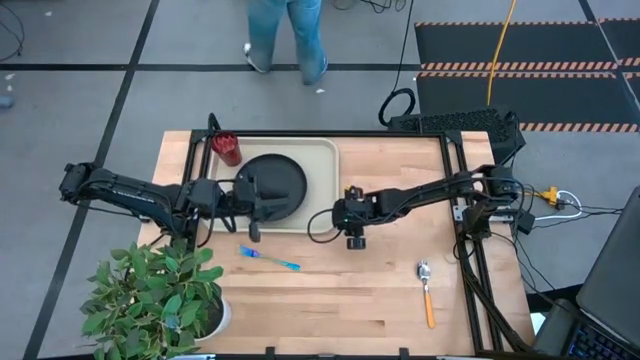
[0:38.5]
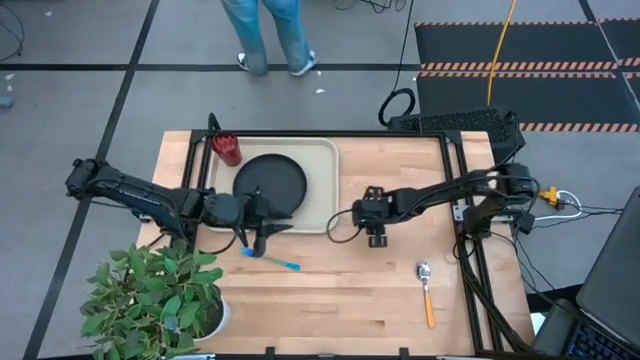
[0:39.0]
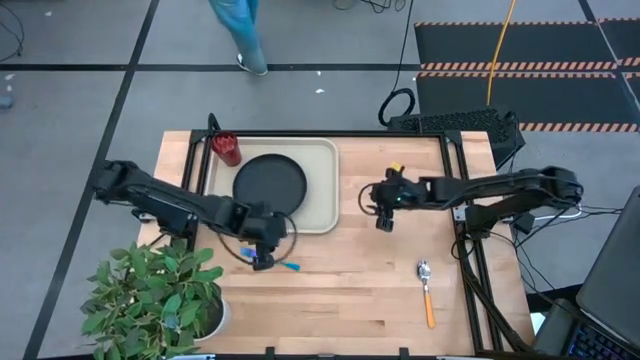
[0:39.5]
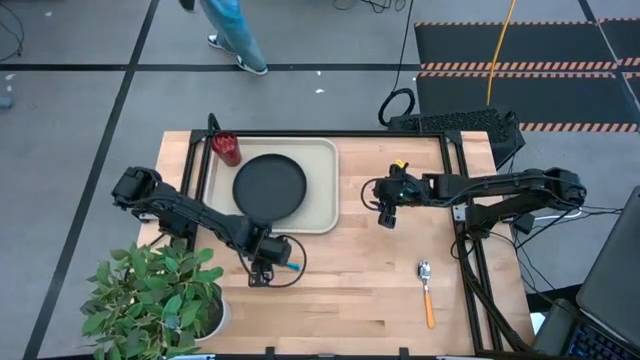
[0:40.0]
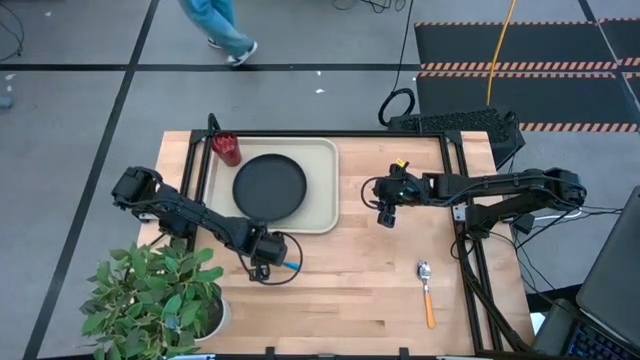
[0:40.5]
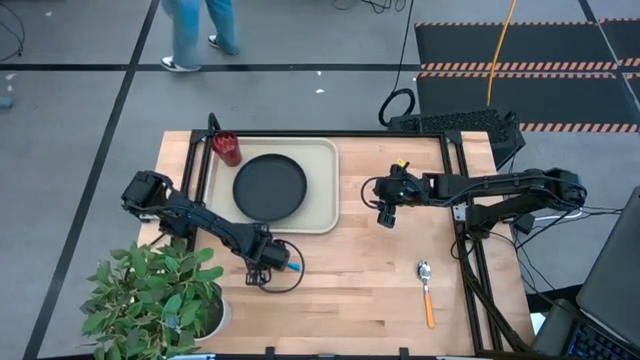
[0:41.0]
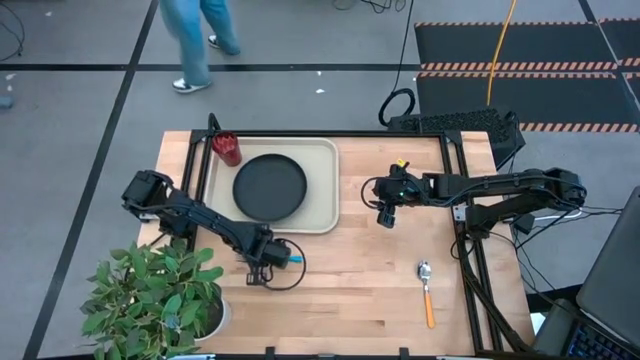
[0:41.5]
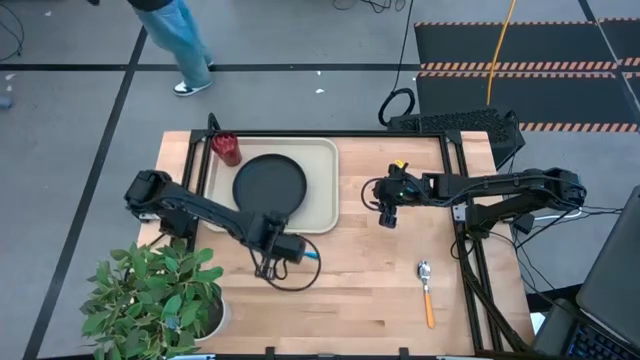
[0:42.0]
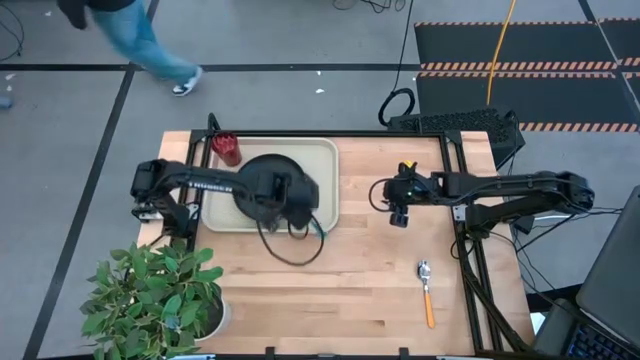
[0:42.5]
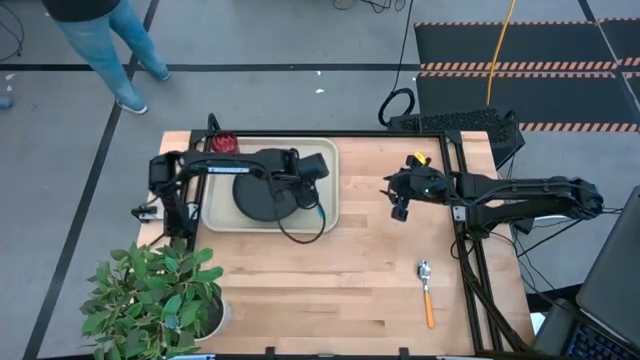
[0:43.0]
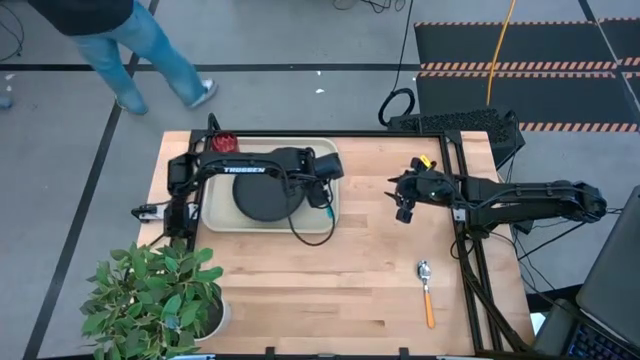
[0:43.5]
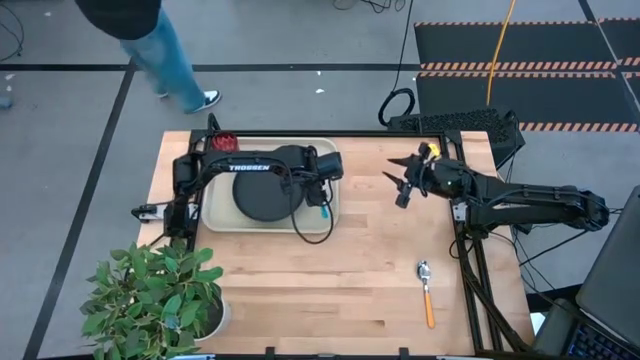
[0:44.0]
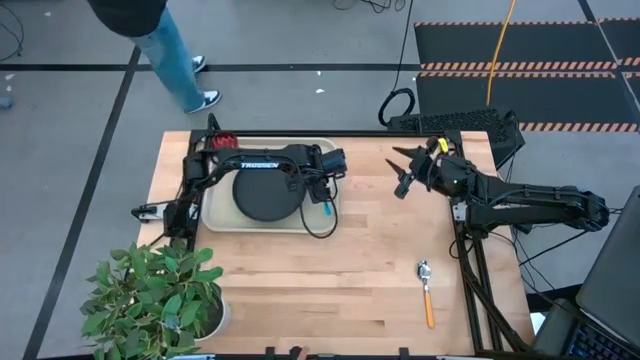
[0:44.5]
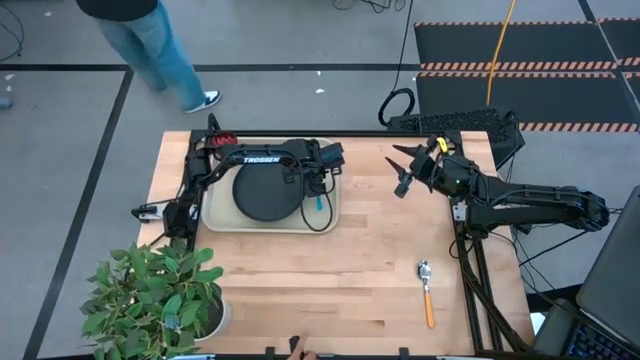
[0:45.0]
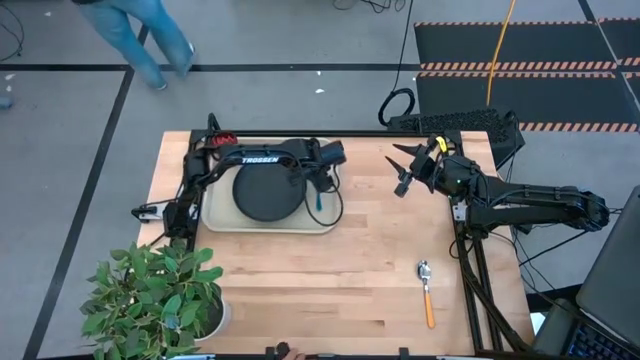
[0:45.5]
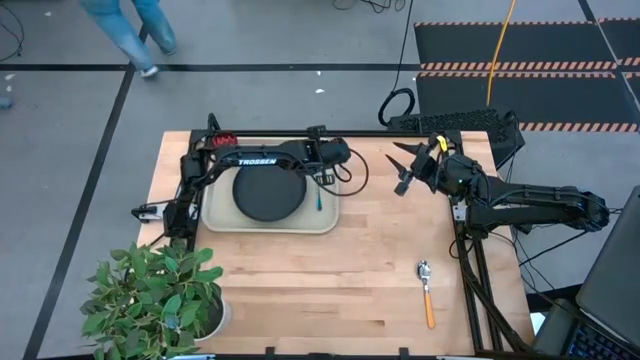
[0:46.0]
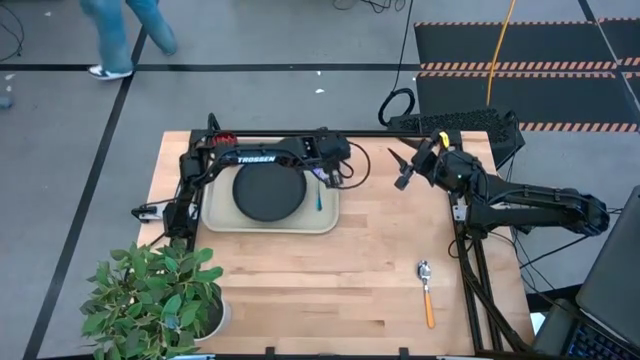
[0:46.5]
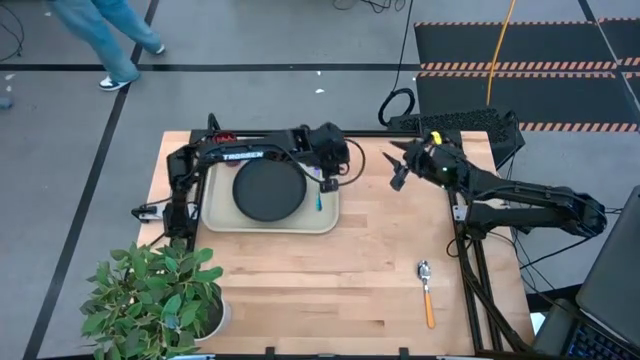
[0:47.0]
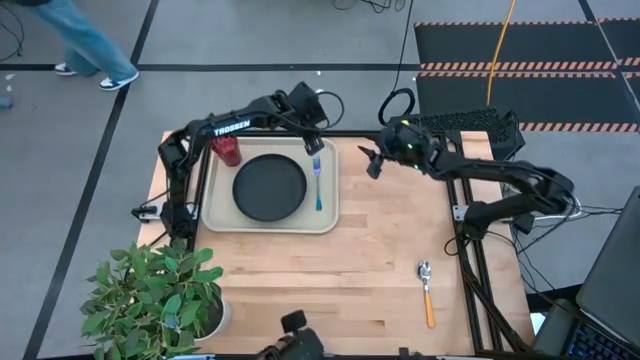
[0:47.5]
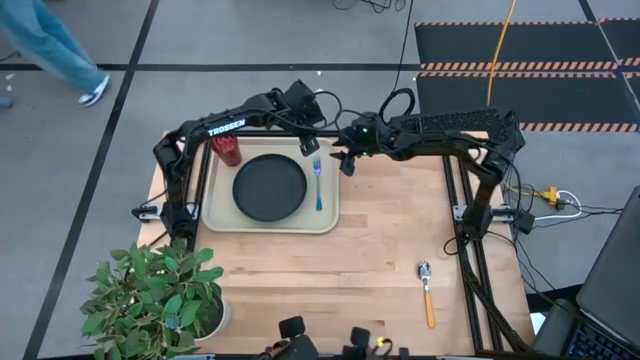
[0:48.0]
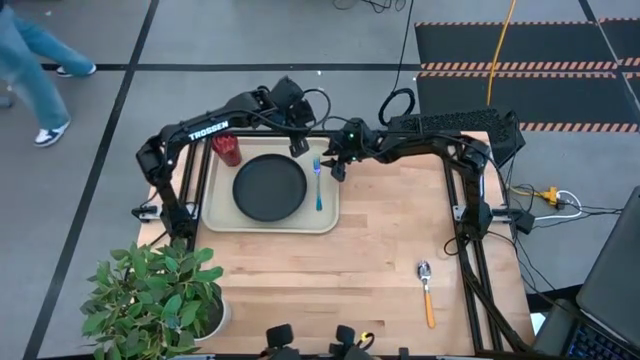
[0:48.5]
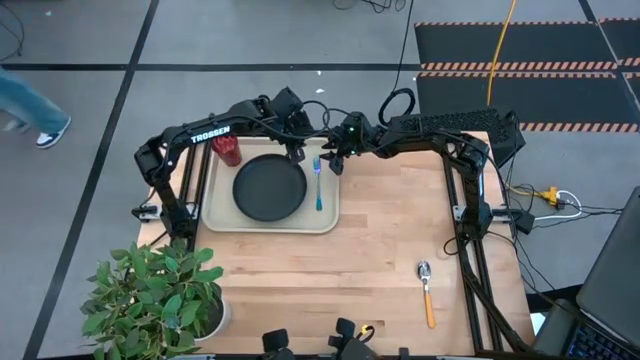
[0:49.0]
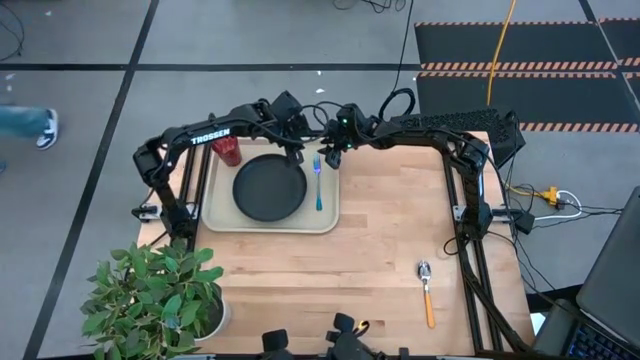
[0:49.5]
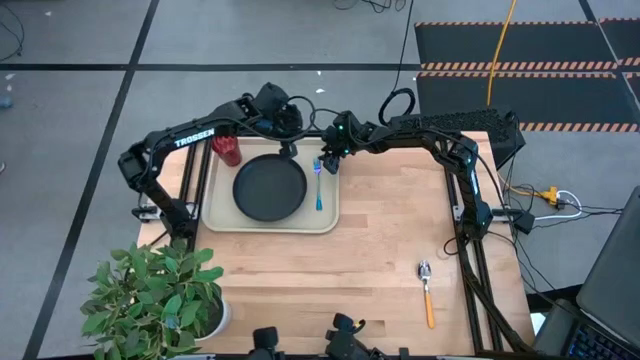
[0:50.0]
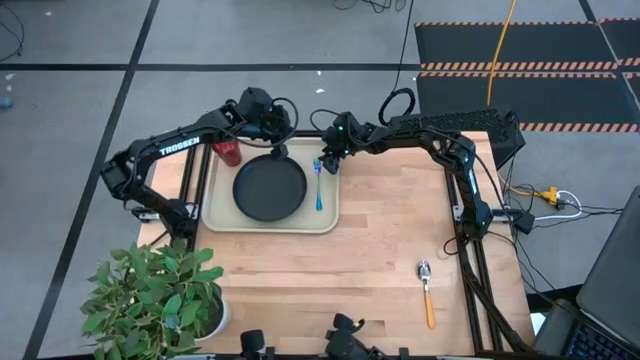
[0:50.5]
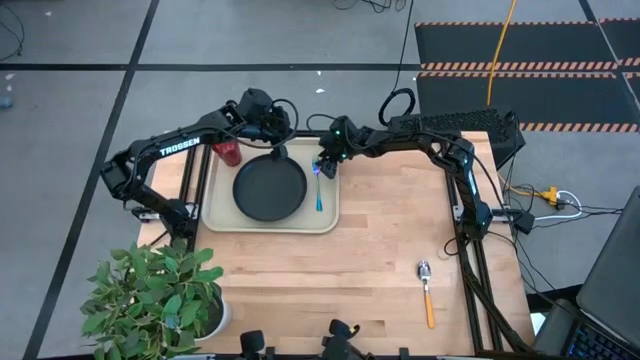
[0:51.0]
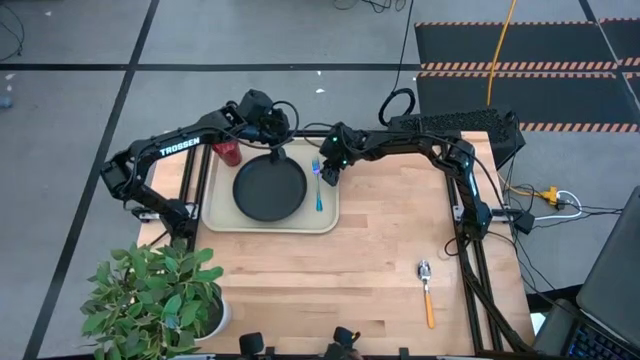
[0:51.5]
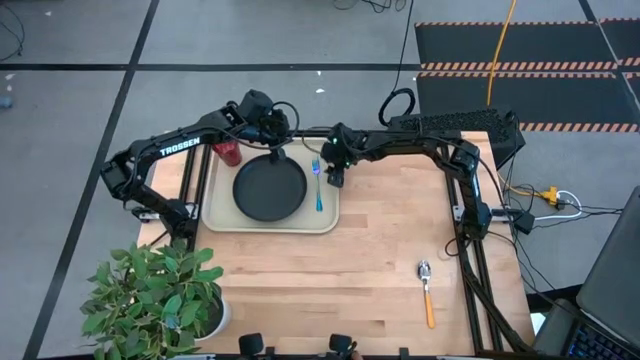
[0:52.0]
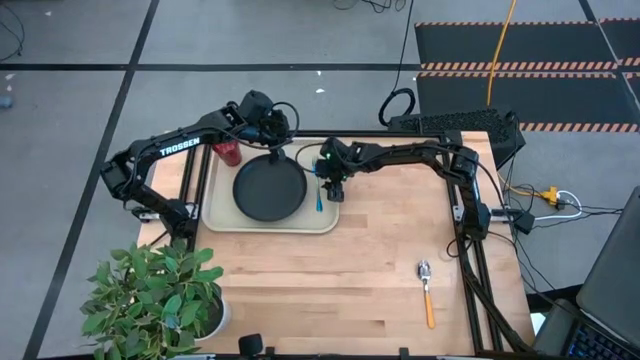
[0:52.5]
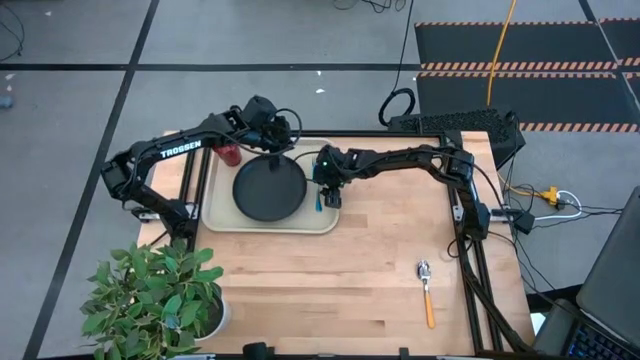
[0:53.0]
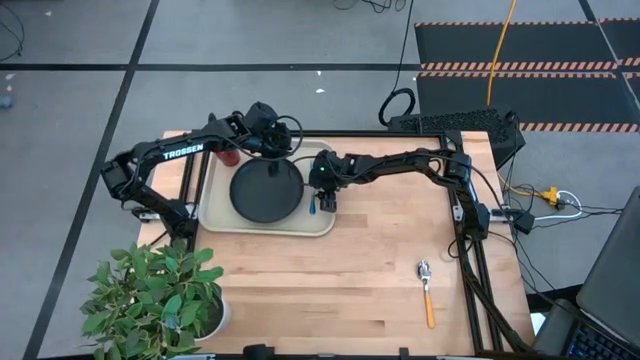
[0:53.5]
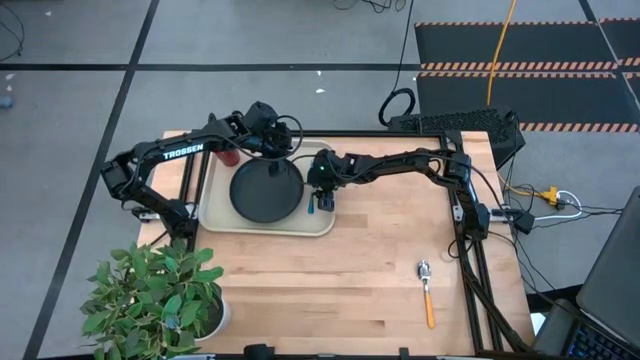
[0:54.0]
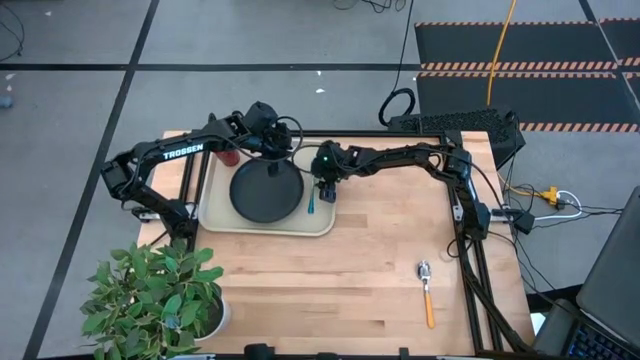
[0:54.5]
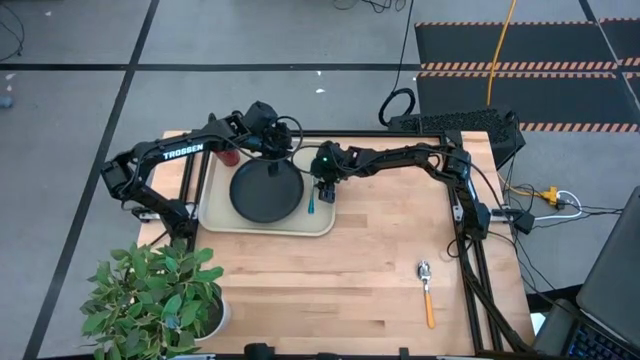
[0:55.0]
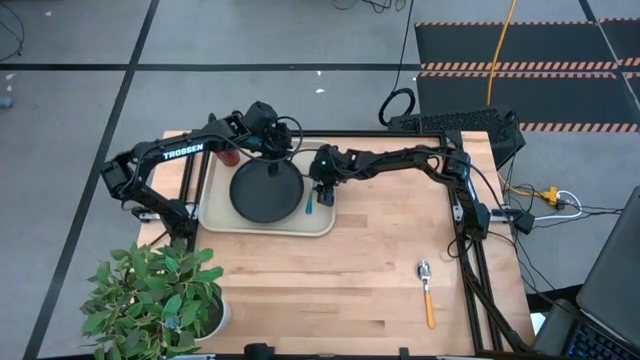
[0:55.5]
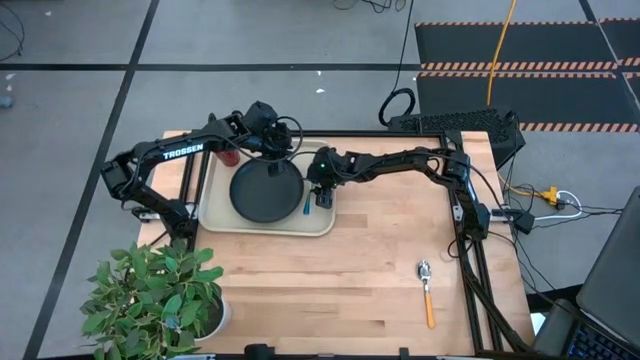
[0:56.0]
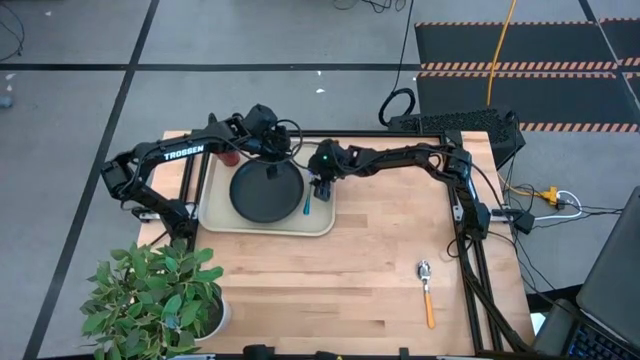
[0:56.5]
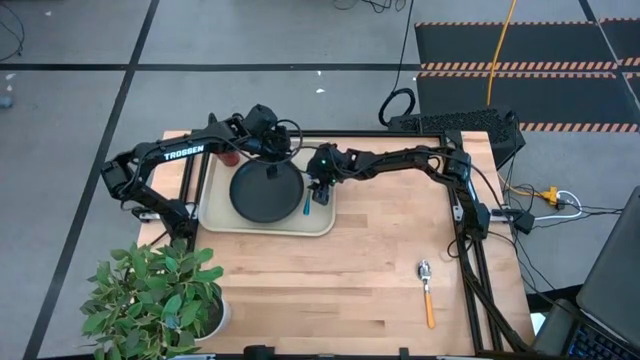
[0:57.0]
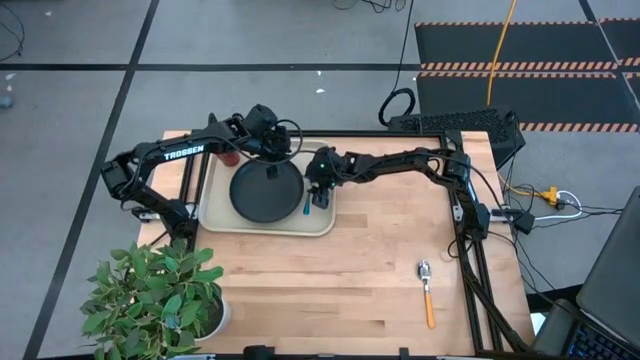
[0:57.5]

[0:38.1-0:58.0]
Task: Pick and place plate/cup/fork/spoon on tray
Put the blue fork on the right side of the black plate

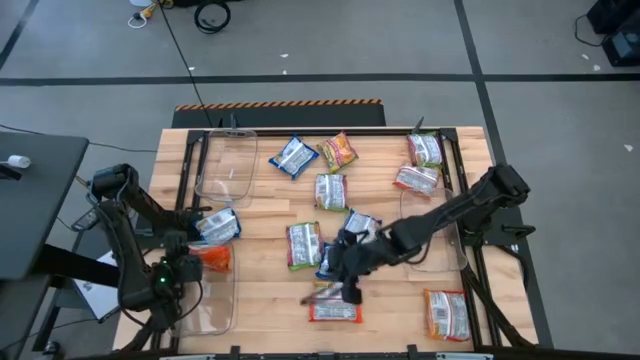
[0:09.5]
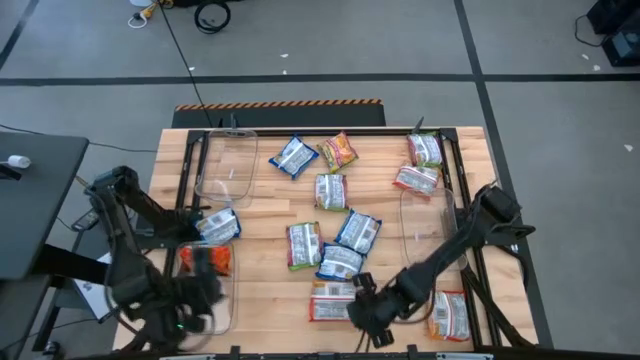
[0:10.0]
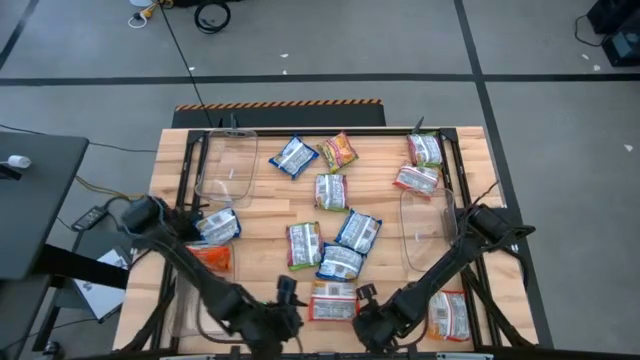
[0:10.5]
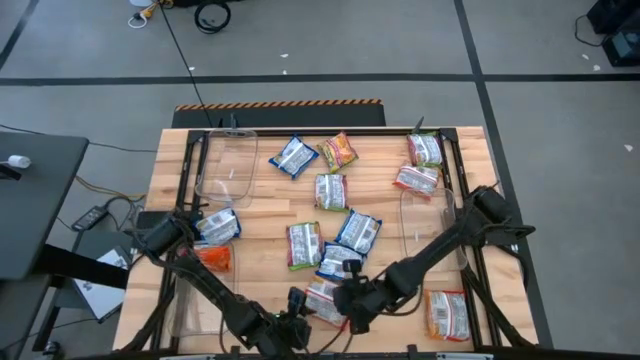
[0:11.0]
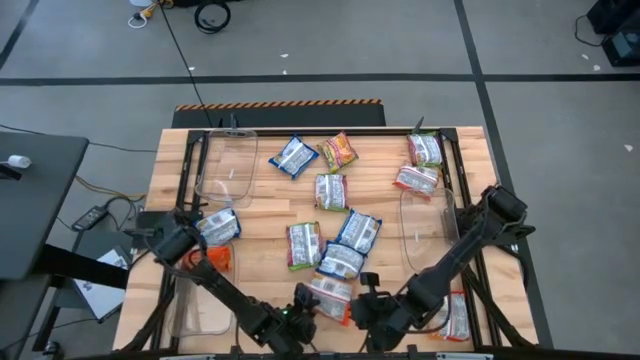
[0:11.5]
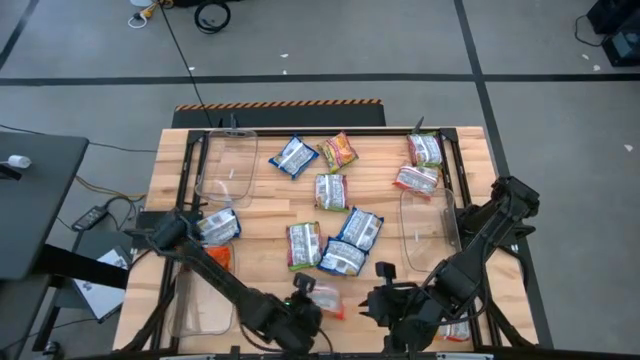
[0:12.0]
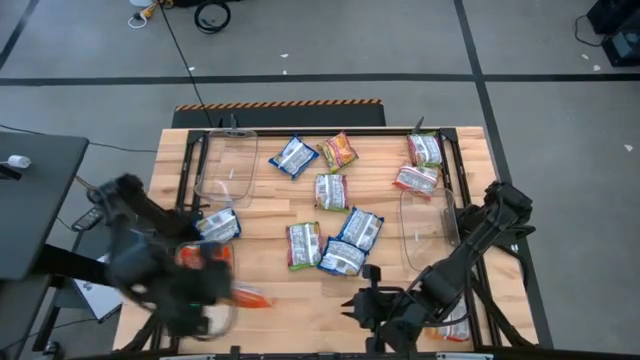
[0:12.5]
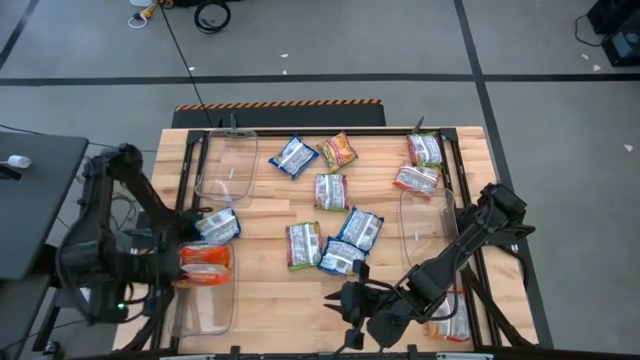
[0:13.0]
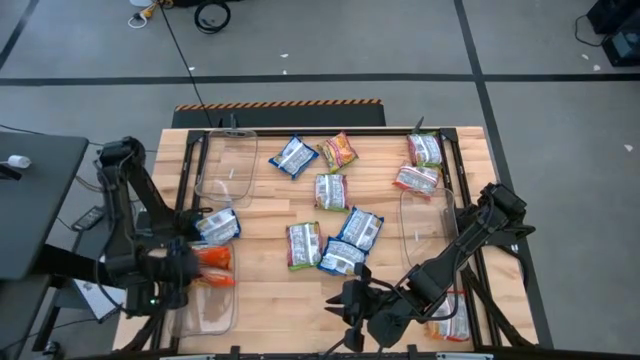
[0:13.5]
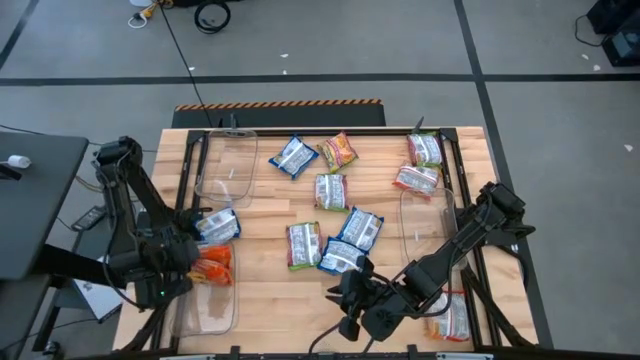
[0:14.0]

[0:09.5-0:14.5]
Task: Sort Maruchan noodles
Put the left orange noodle pack into the bottom left transparent bin
